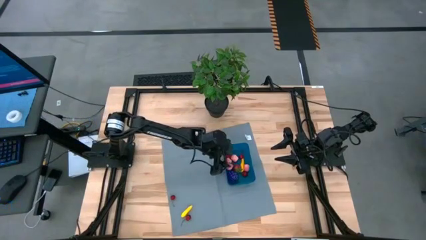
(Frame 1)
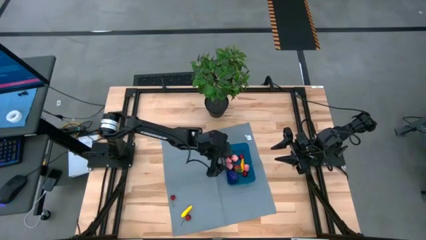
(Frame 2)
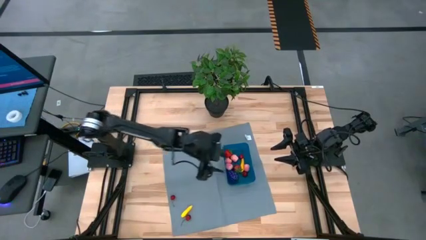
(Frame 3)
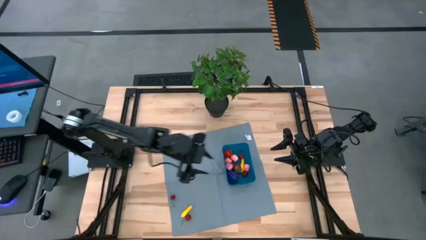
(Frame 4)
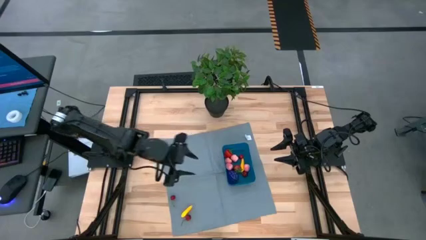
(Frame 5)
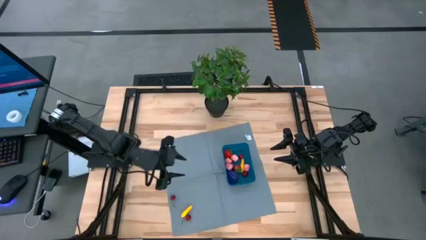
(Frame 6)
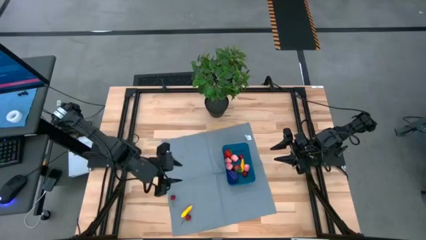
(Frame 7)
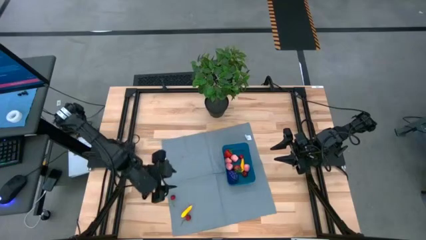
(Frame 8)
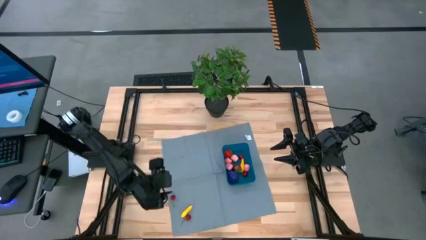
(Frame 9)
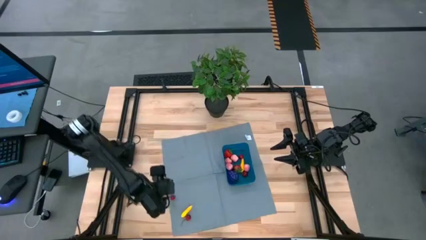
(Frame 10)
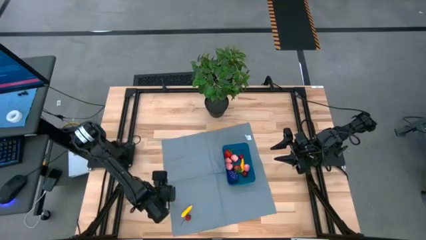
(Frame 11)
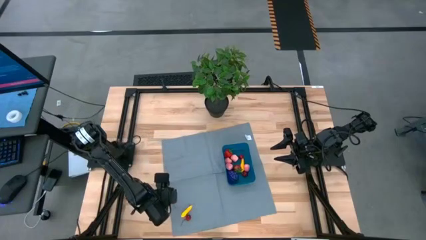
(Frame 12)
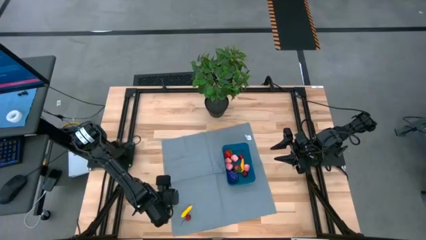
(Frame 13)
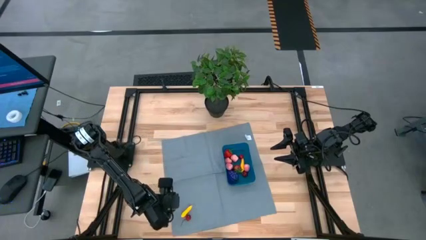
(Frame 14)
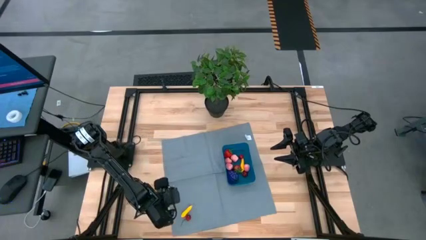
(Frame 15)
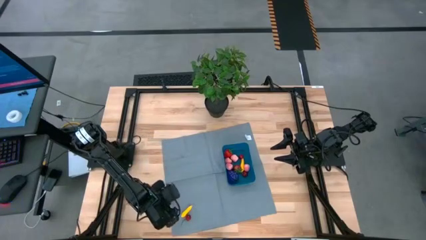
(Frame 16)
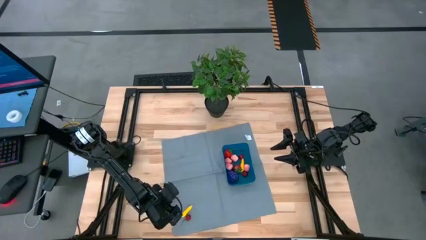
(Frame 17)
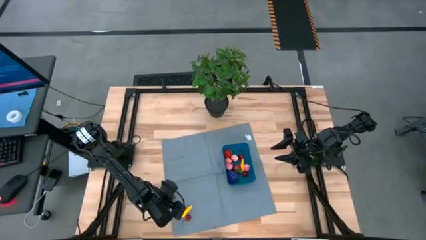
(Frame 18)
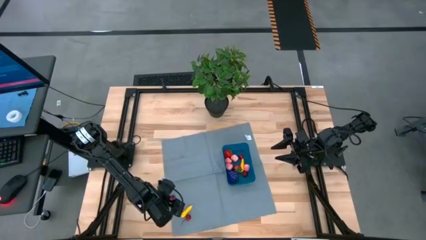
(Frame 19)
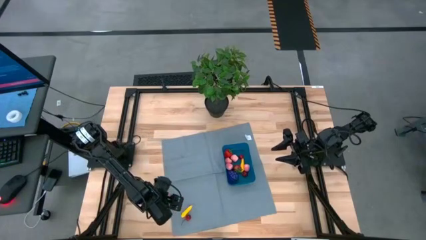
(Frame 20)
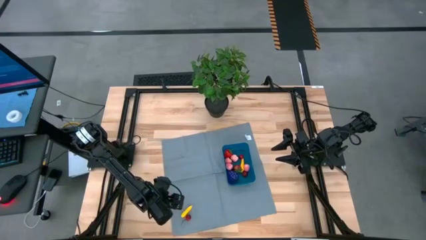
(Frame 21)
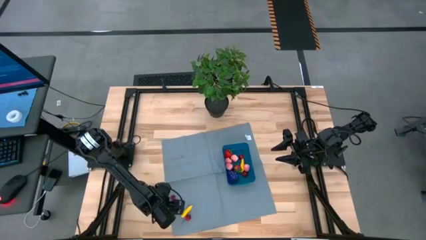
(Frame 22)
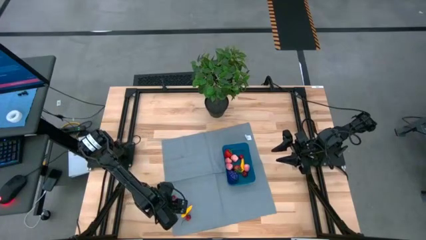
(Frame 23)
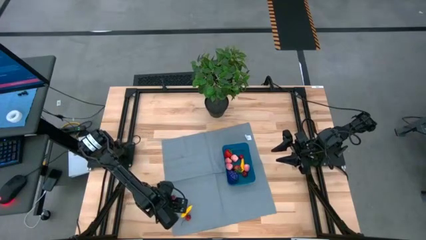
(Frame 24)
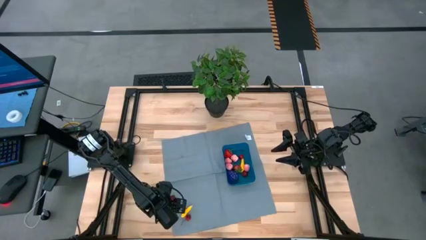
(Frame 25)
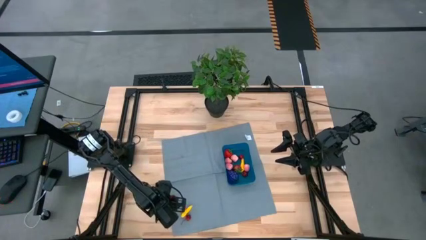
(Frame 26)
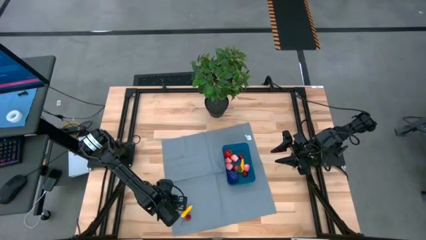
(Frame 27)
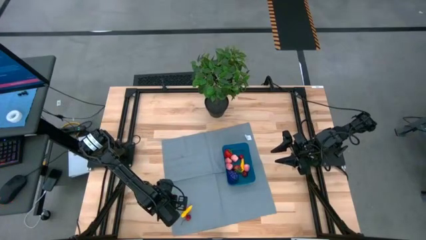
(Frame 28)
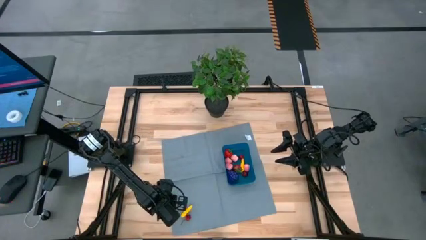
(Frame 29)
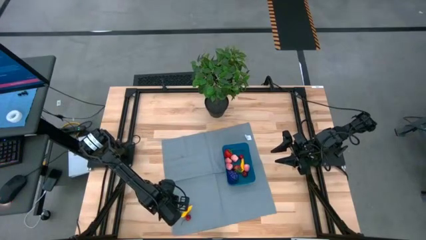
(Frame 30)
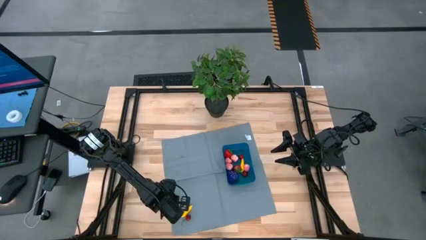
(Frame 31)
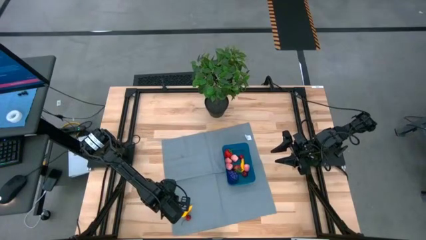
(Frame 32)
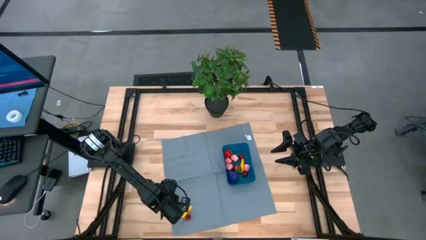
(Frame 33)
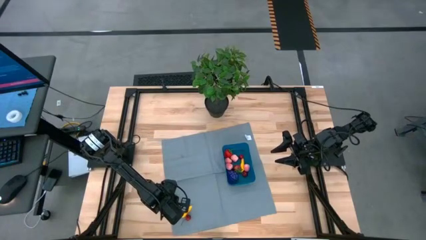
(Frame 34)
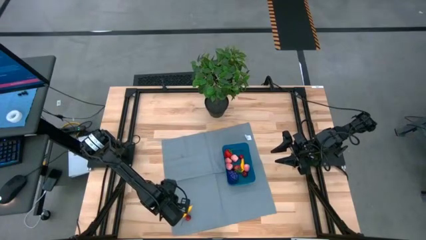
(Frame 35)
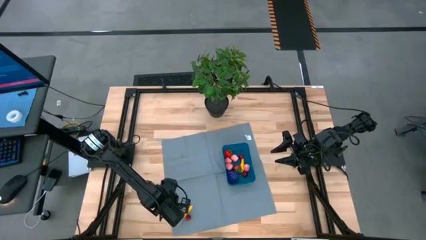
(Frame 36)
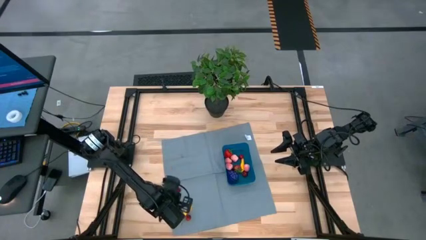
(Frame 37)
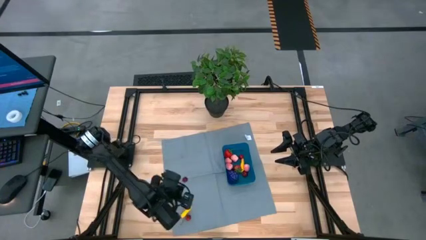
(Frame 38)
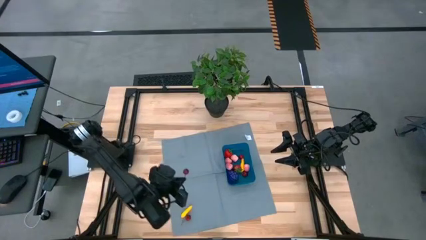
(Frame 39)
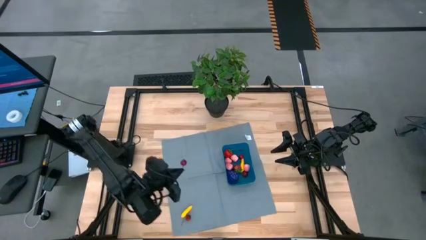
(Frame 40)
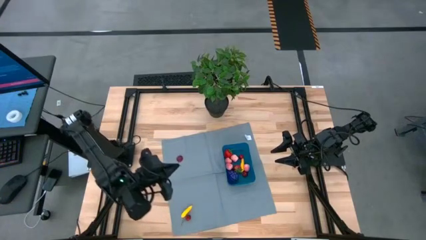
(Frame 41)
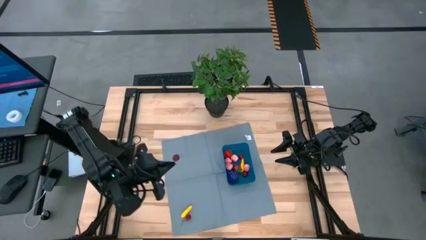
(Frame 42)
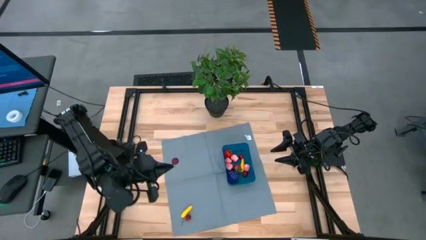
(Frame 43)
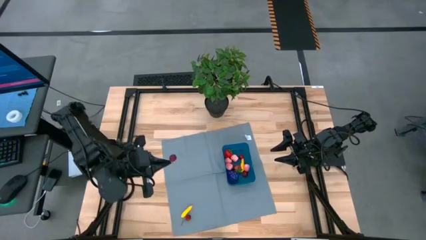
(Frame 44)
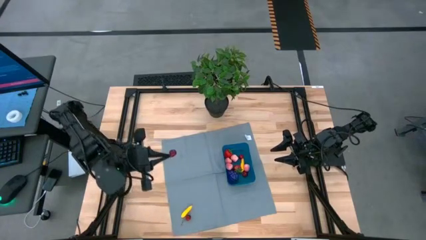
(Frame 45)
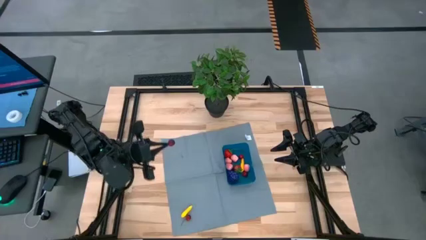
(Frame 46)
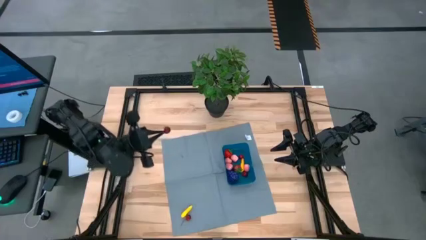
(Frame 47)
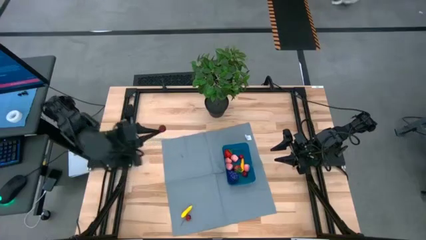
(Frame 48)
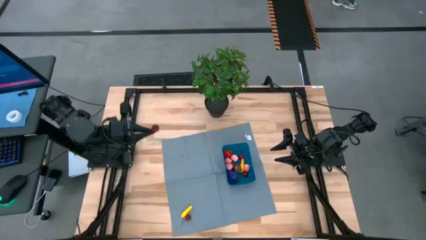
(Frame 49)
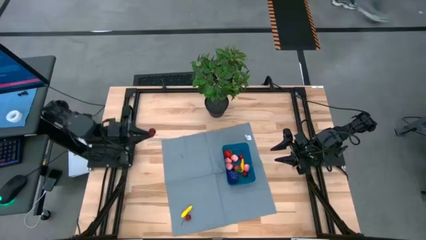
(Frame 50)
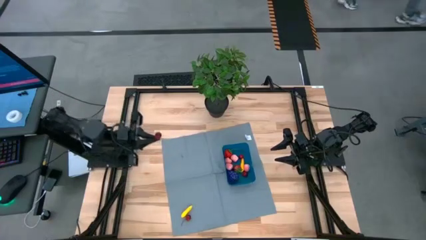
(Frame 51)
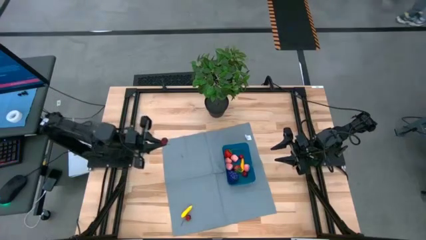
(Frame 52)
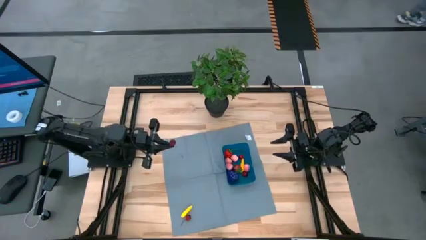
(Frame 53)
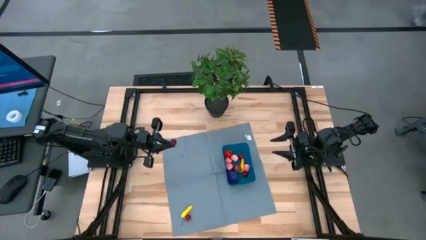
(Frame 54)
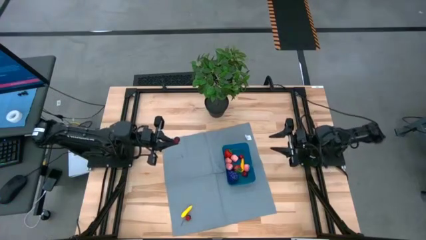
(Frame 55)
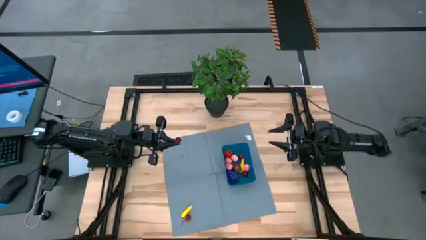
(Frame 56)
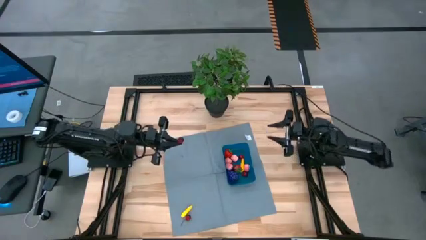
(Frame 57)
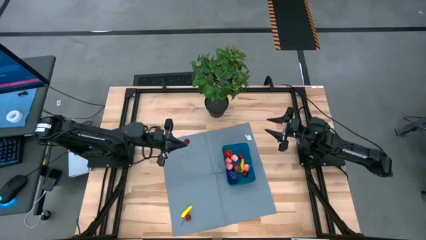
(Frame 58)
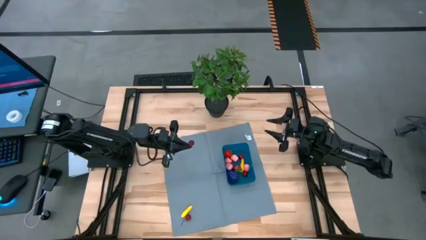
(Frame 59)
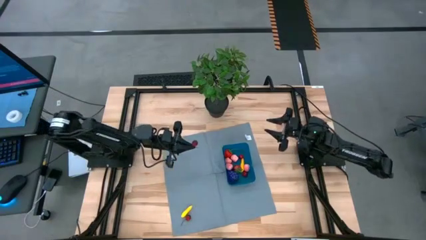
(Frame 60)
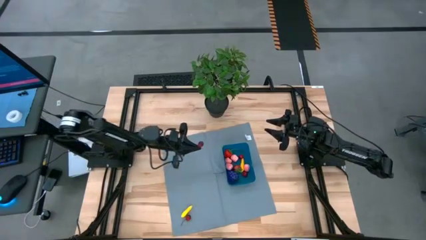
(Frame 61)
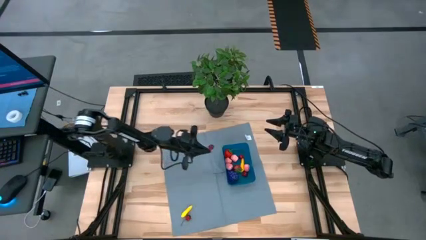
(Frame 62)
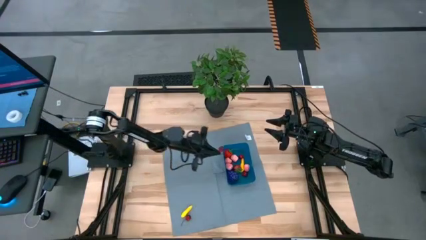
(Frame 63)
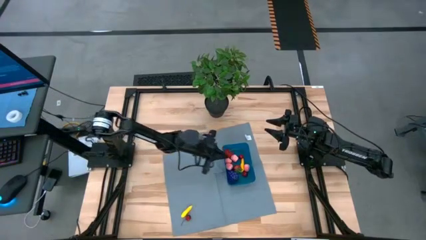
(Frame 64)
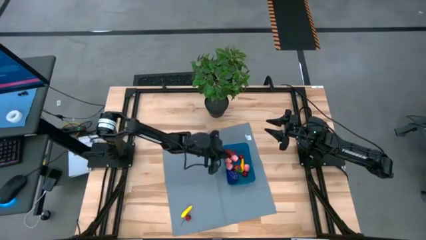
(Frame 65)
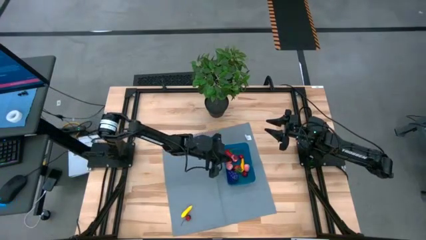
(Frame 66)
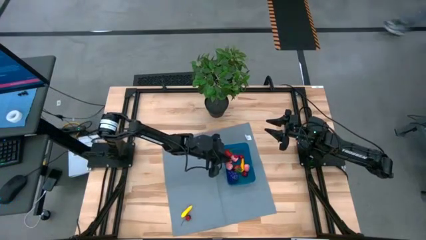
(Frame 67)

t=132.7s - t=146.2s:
Task: Pick and placing Produce into tupperware
Put the red cherry into the bin
